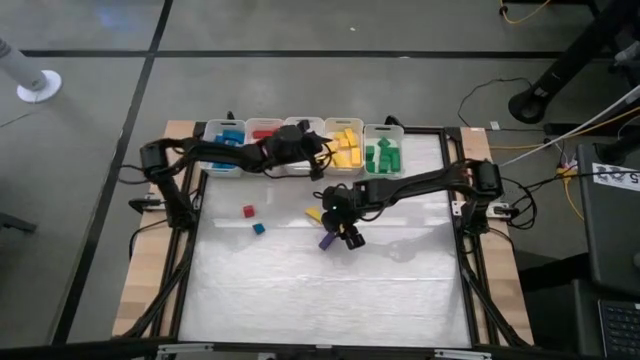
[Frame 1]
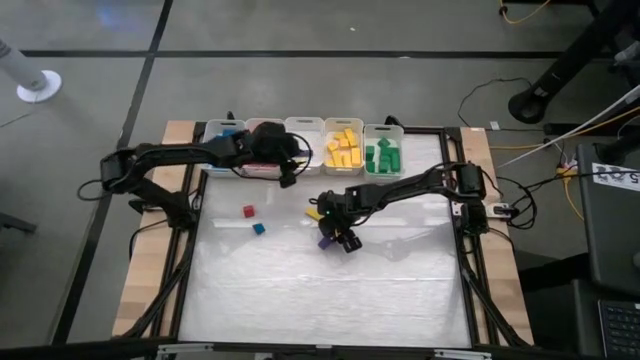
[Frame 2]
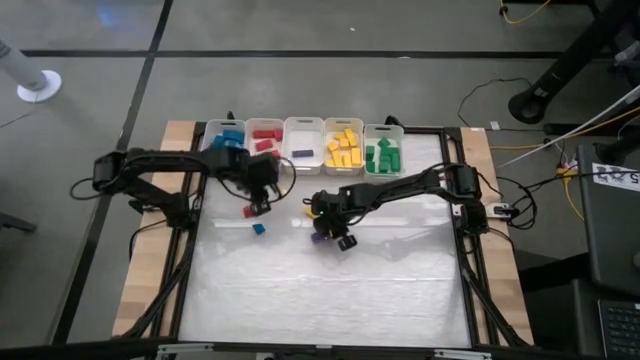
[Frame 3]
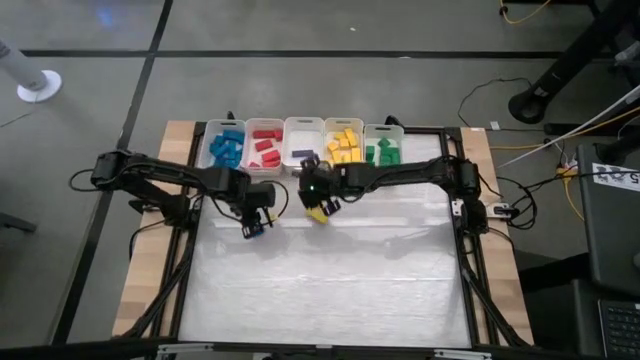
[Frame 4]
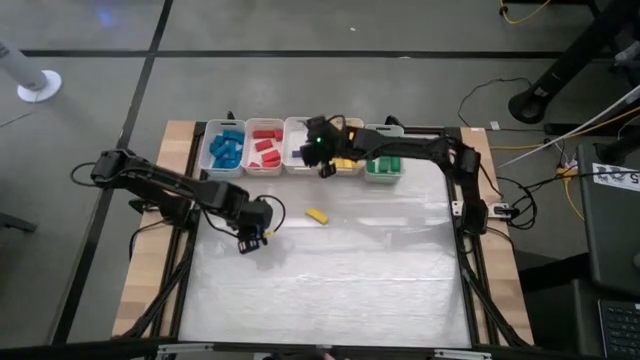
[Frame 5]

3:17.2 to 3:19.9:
Task: Sort blocks
Put the violet block into the middle white bin

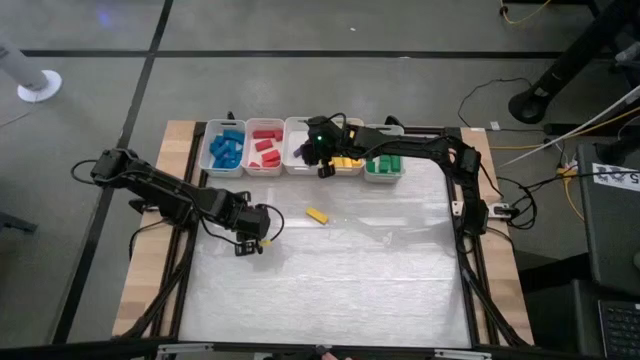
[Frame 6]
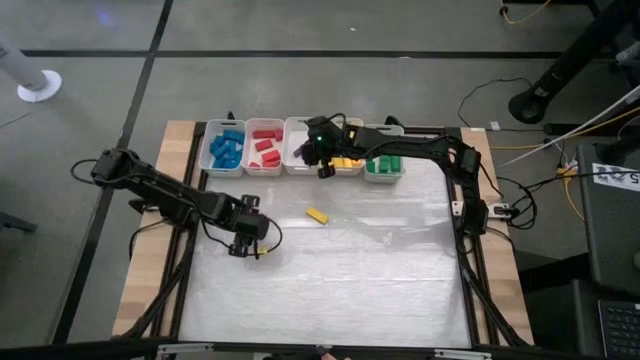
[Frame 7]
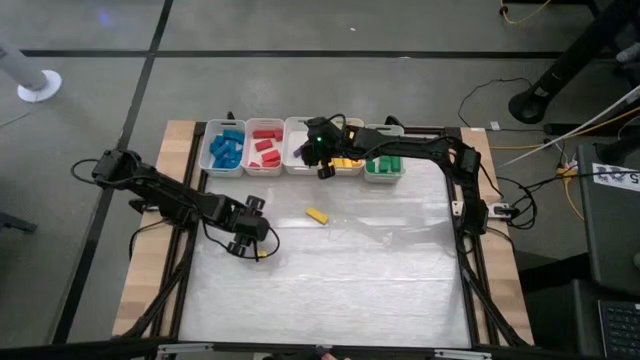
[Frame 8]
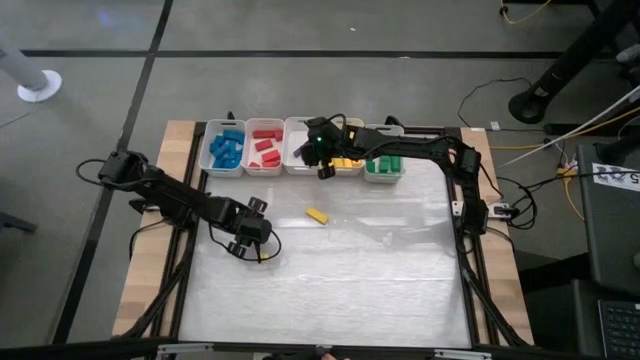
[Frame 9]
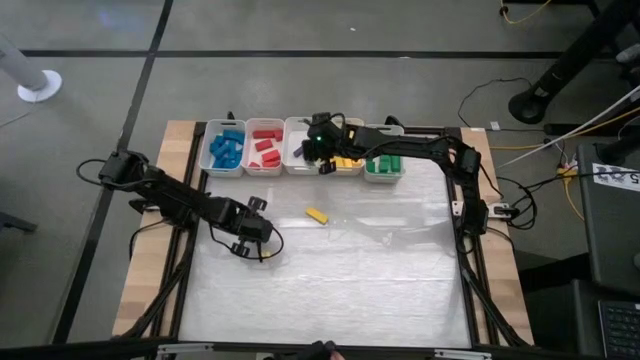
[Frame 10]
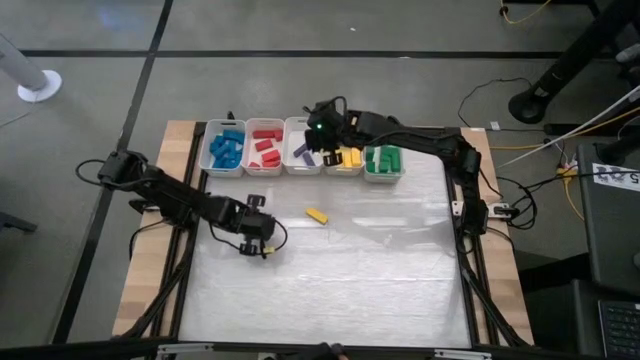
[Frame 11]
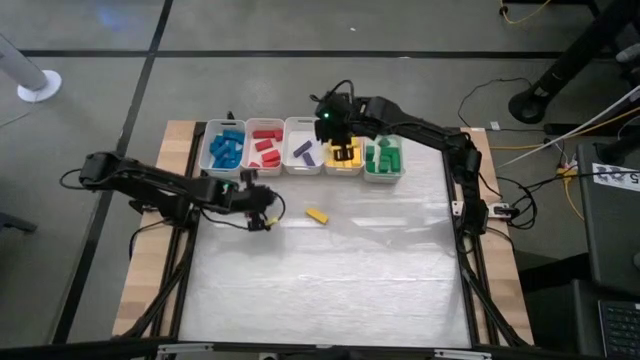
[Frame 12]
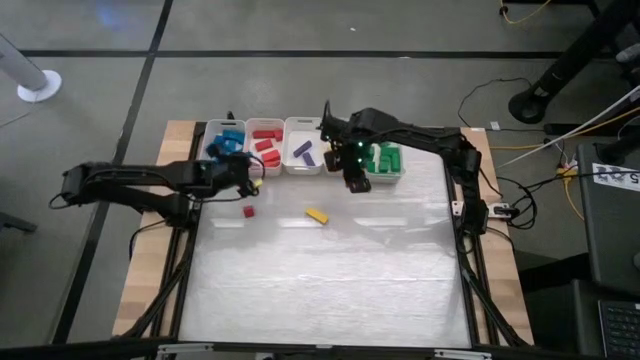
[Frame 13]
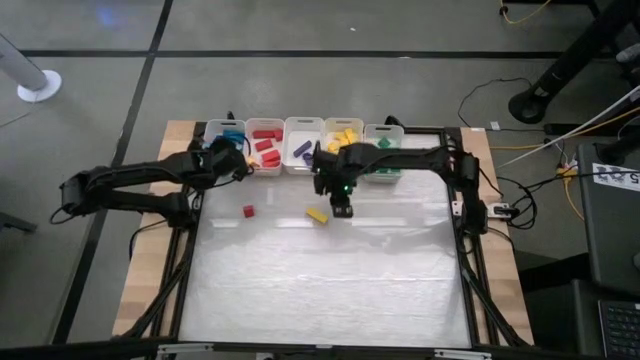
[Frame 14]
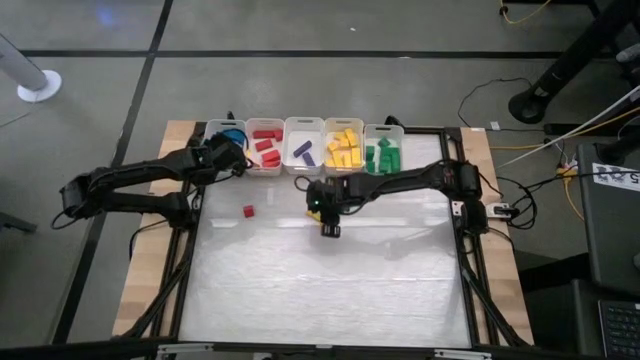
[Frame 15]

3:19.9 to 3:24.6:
Put the blue block into the left white bin

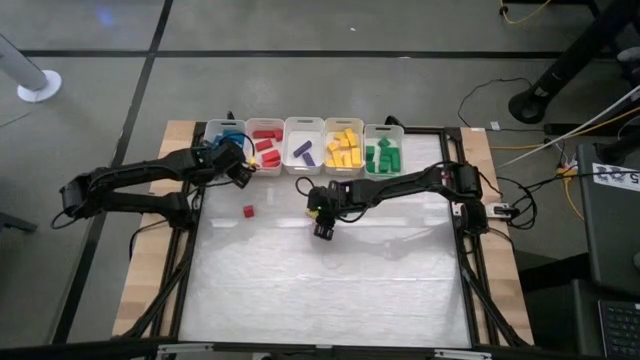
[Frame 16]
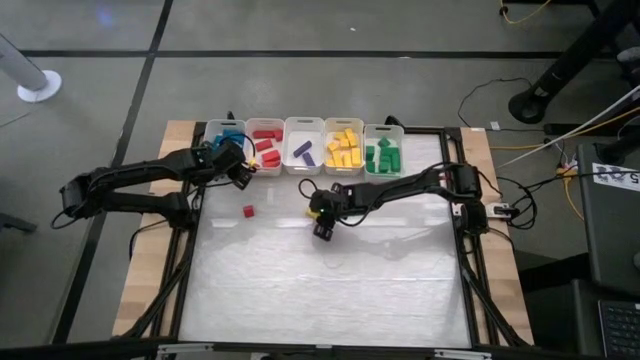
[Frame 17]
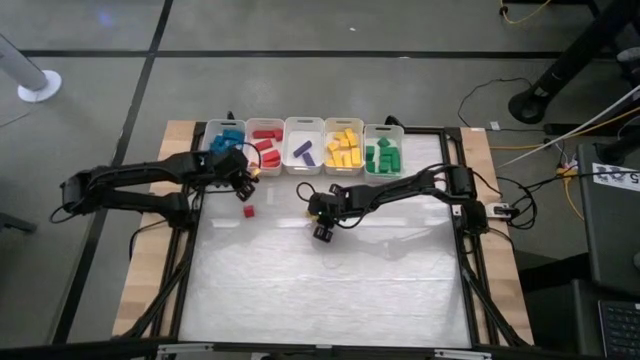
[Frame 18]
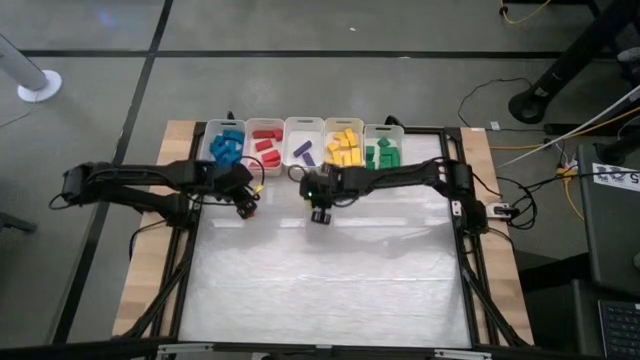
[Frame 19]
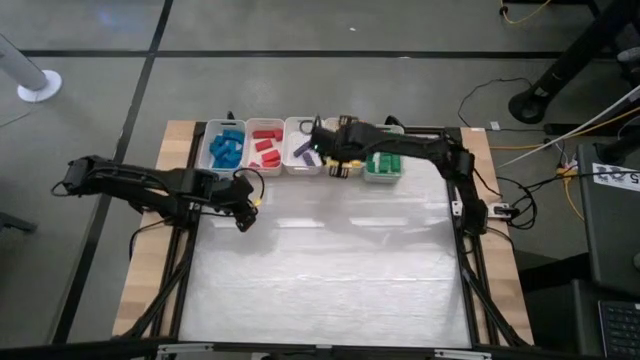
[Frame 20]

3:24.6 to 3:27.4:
Put the yellow block into the middle right white bin

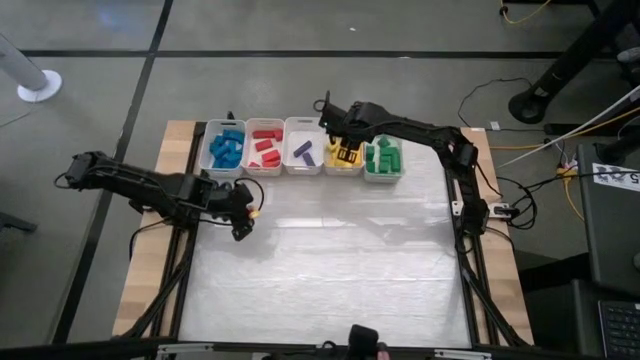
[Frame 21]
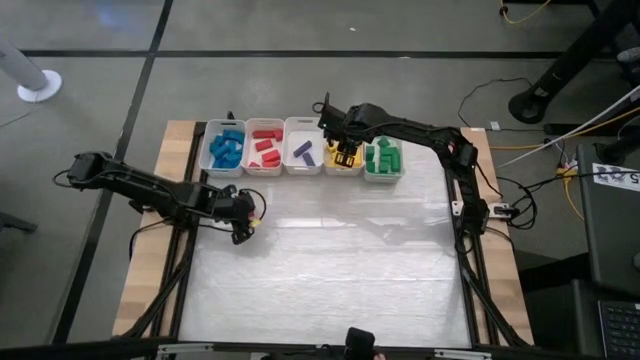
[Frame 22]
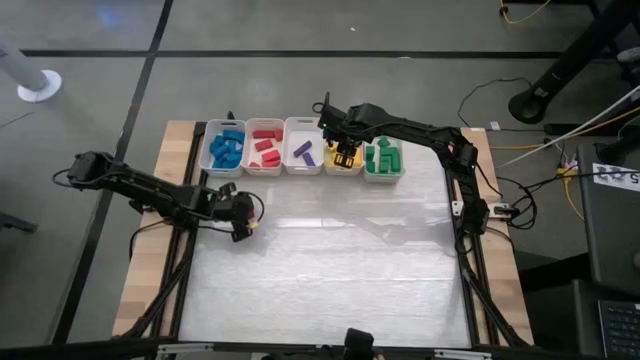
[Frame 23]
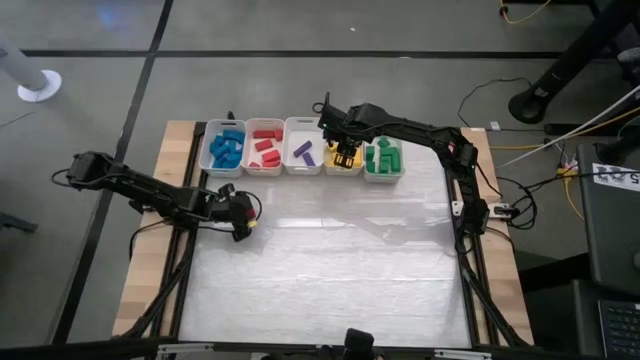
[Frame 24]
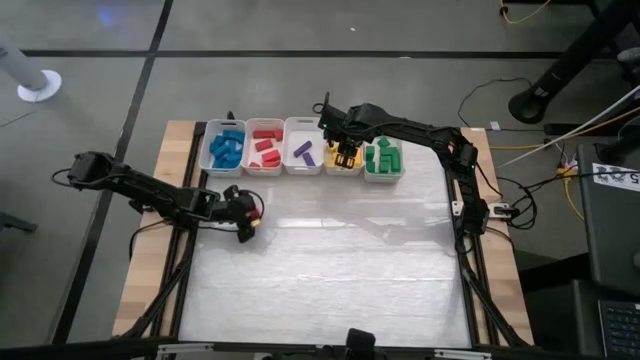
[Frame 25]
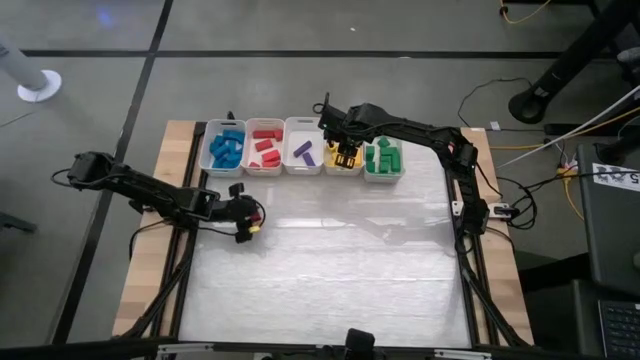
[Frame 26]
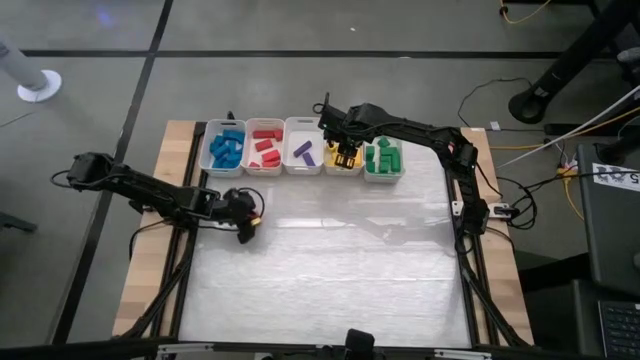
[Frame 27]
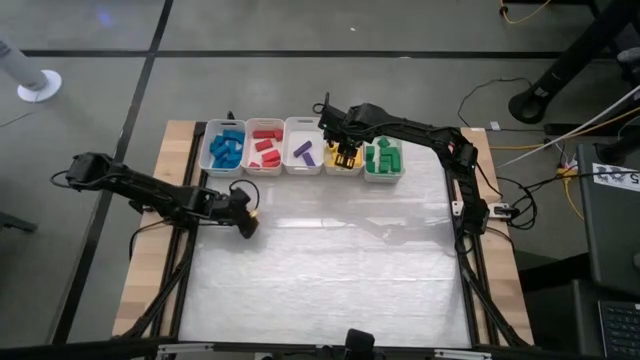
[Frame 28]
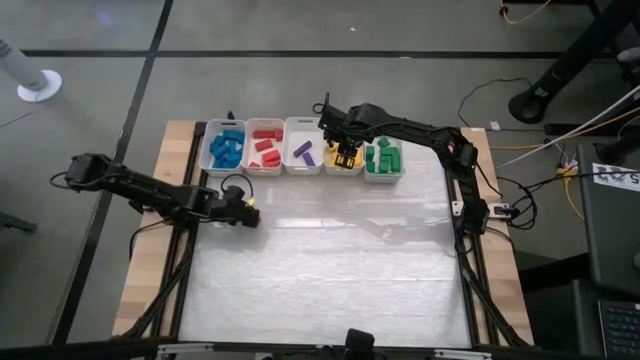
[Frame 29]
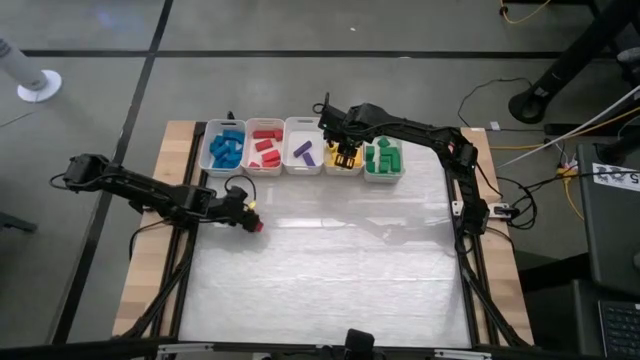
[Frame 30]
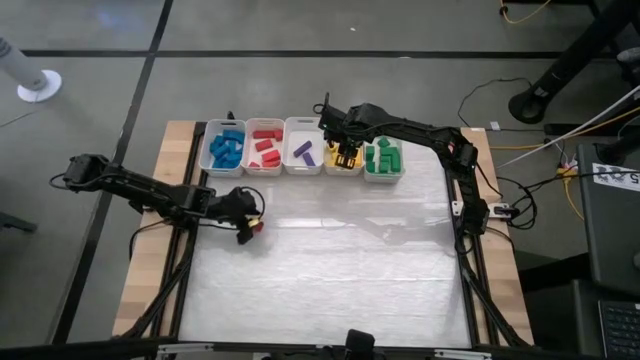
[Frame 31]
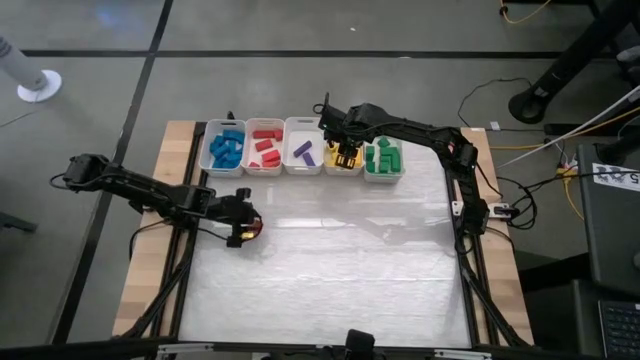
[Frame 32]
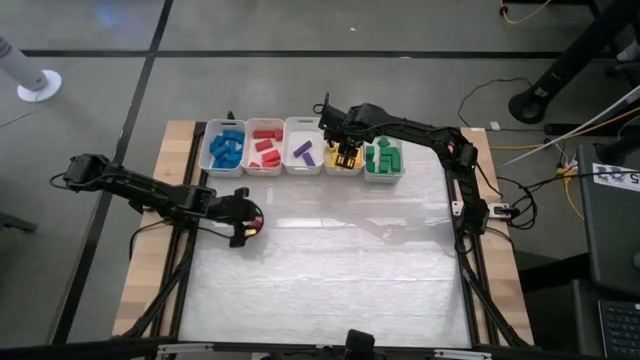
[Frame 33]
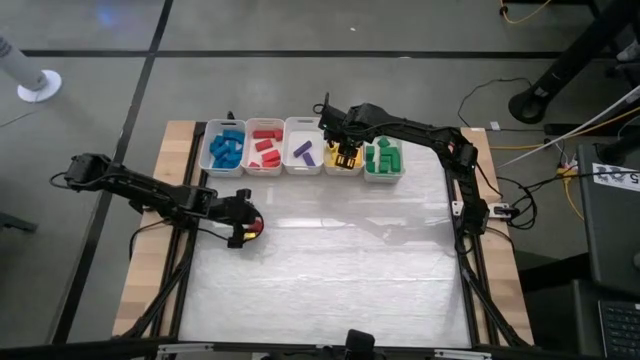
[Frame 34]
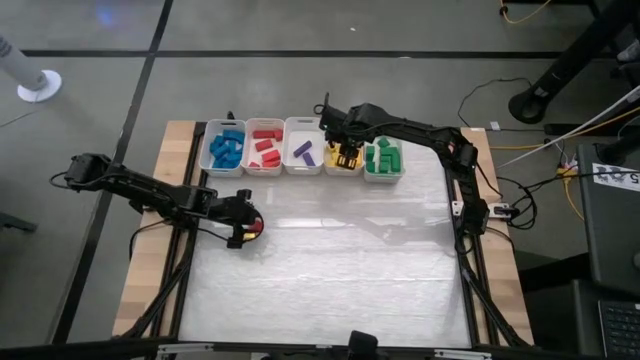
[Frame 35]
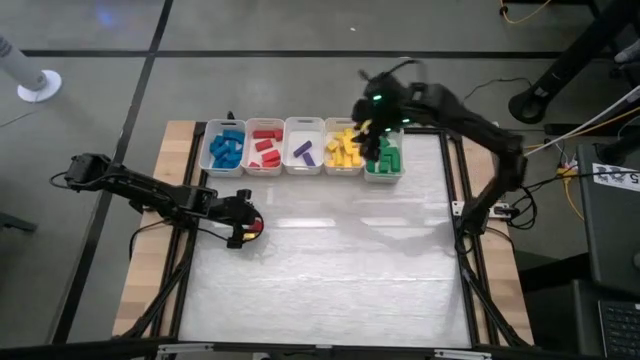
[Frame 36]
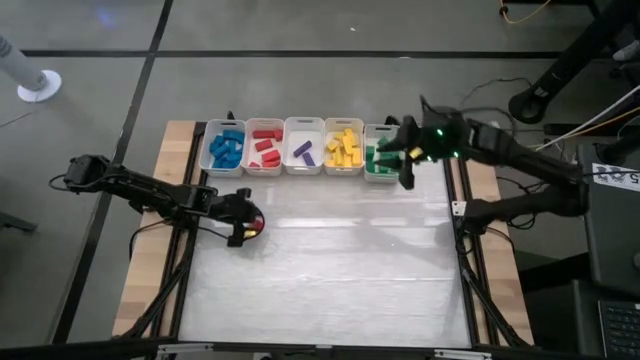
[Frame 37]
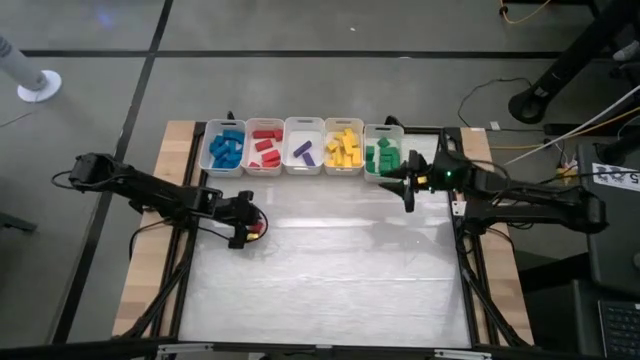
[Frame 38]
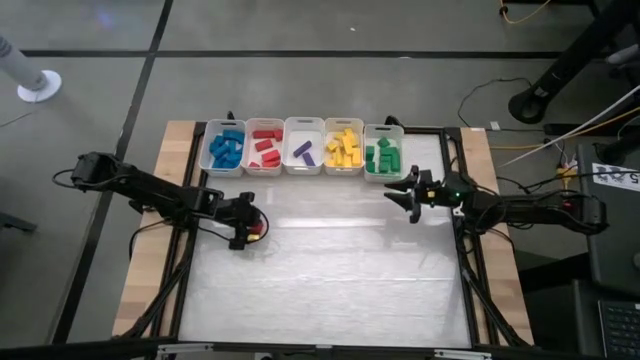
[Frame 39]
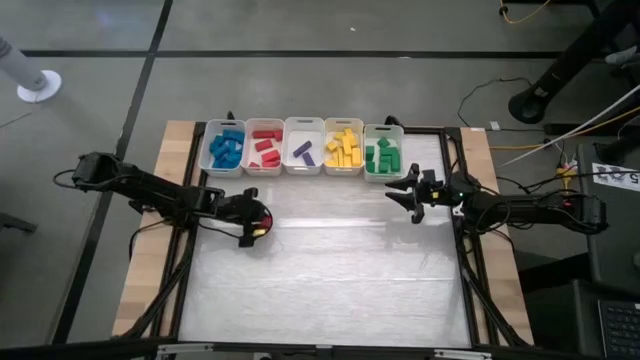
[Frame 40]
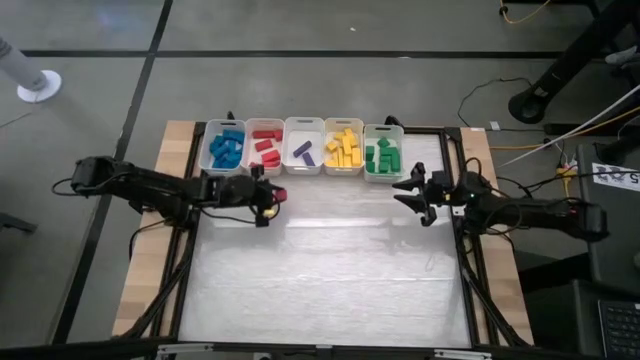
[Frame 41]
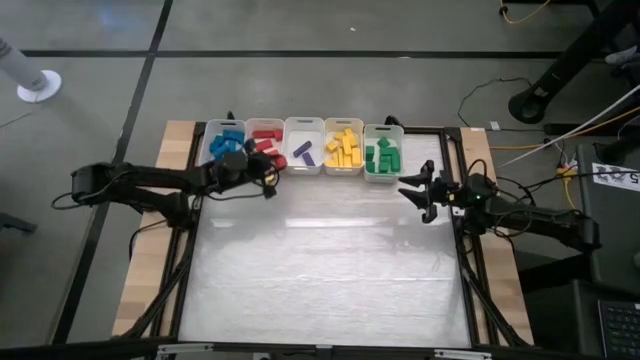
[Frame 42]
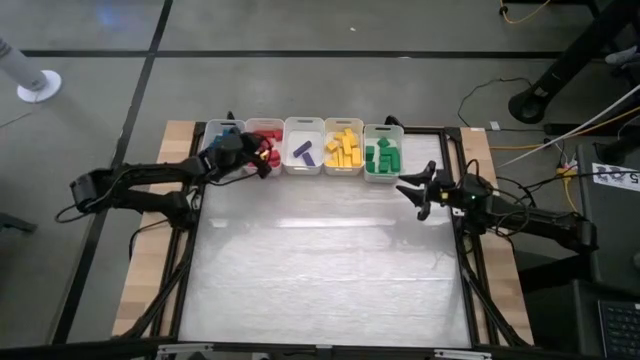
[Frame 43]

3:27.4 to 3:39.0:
Put the red block into the middle left white bin
